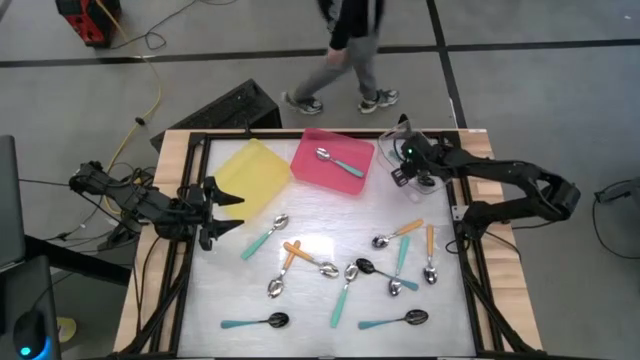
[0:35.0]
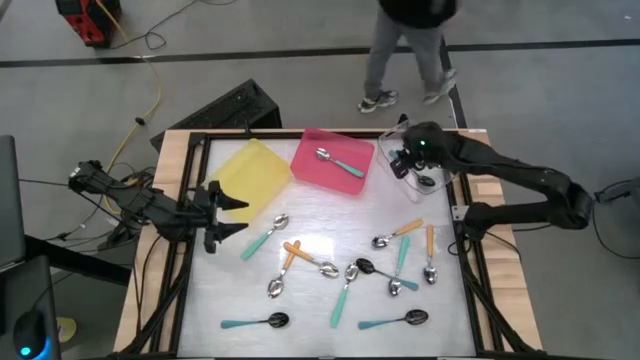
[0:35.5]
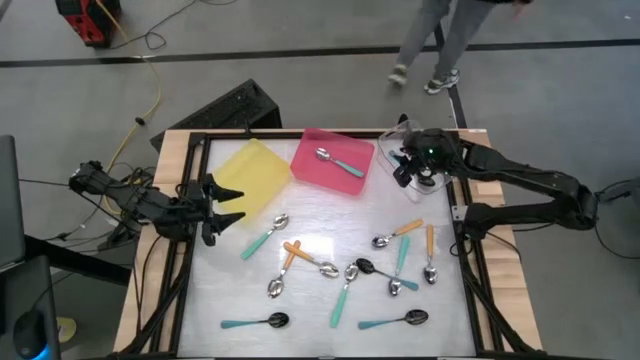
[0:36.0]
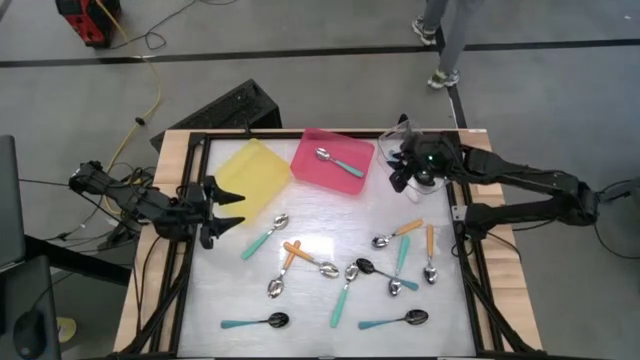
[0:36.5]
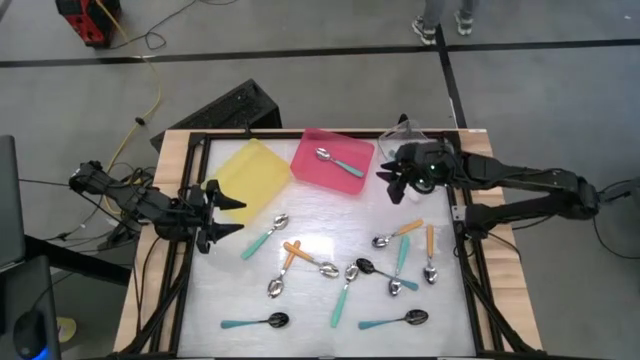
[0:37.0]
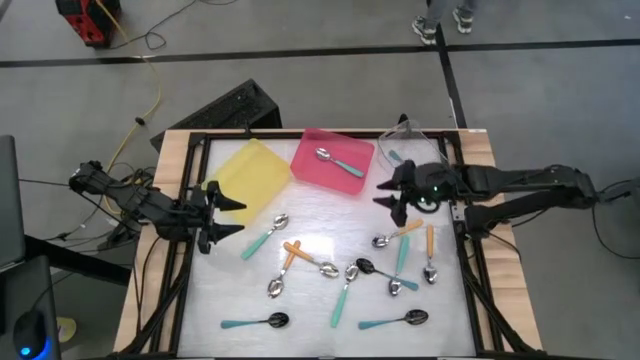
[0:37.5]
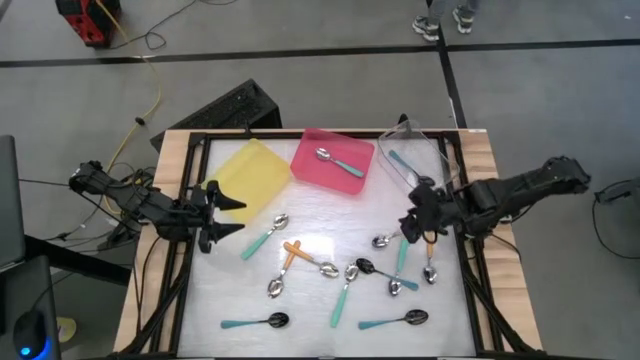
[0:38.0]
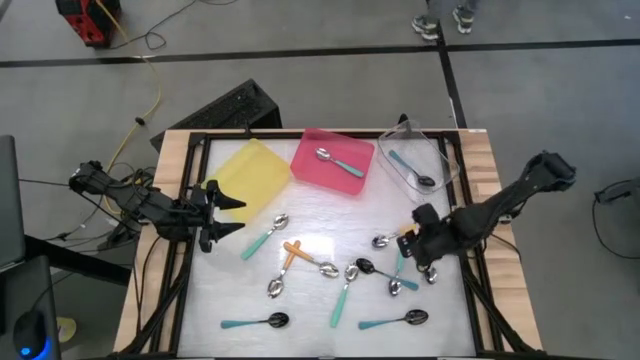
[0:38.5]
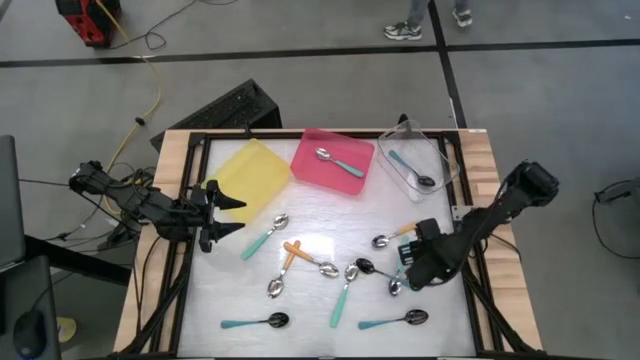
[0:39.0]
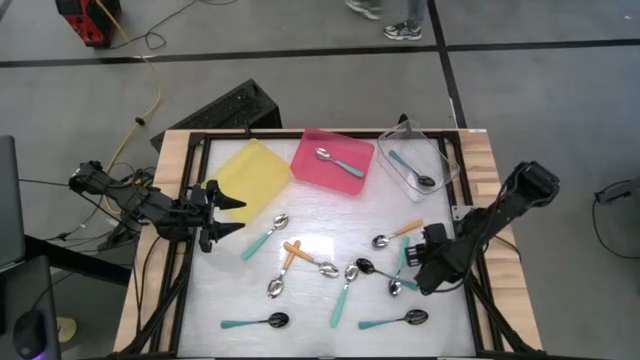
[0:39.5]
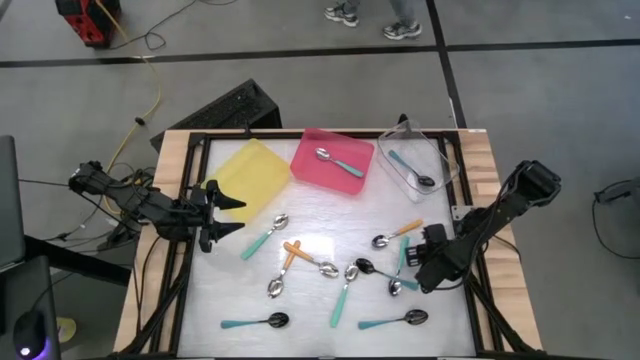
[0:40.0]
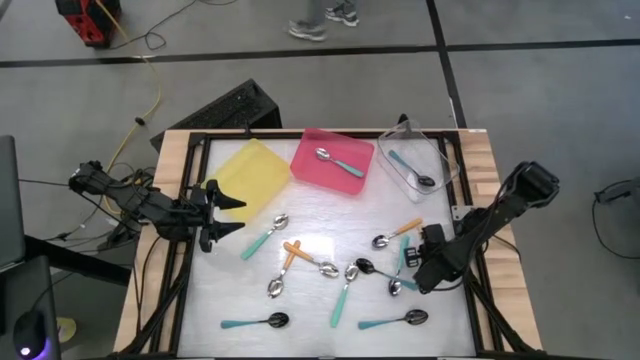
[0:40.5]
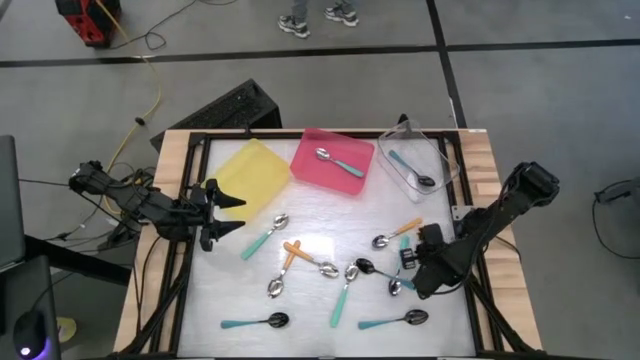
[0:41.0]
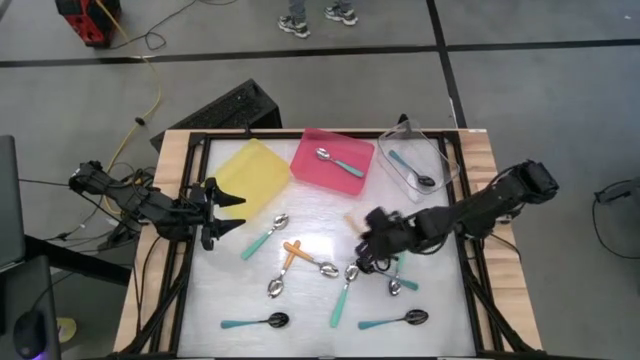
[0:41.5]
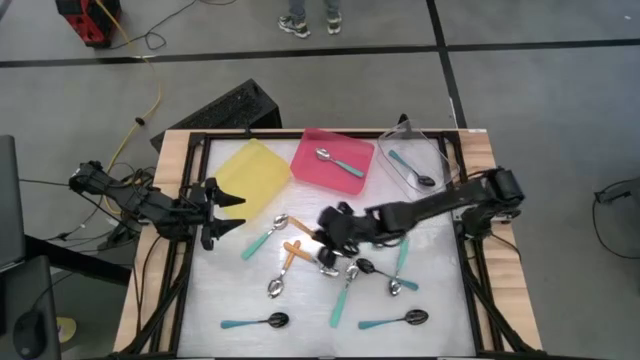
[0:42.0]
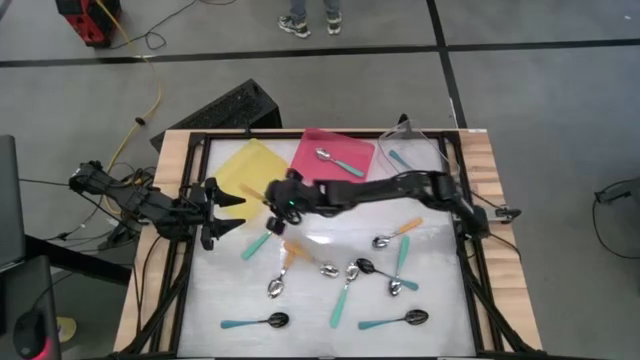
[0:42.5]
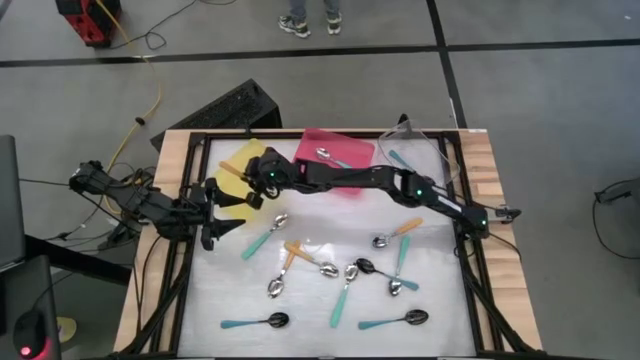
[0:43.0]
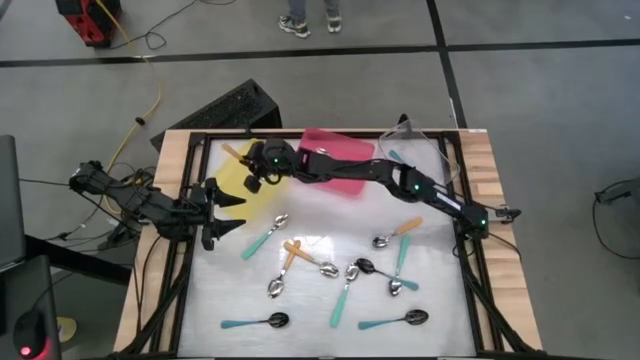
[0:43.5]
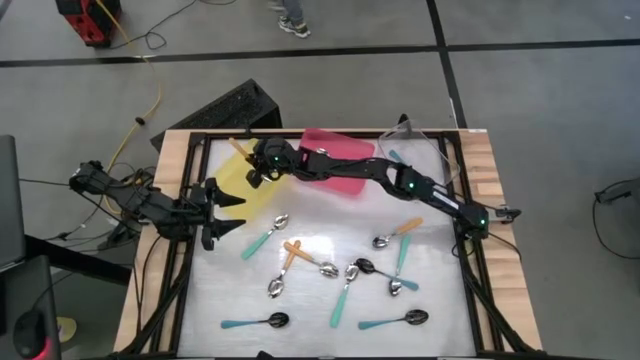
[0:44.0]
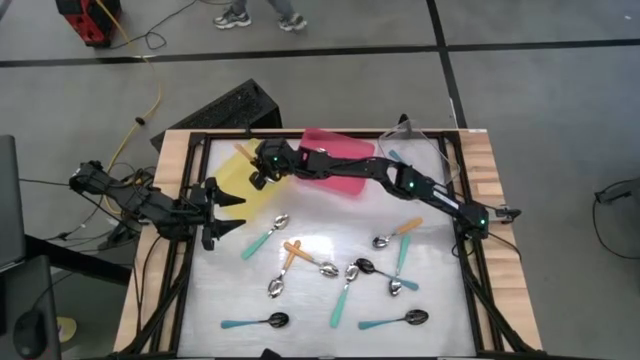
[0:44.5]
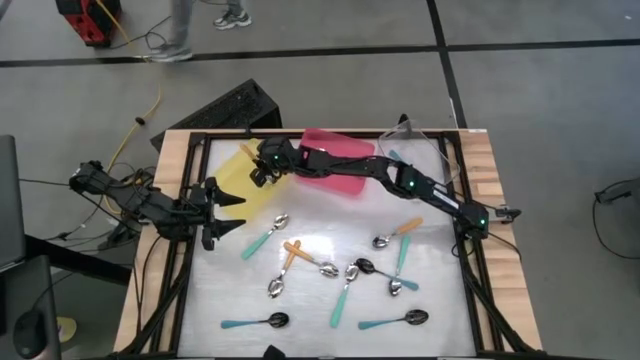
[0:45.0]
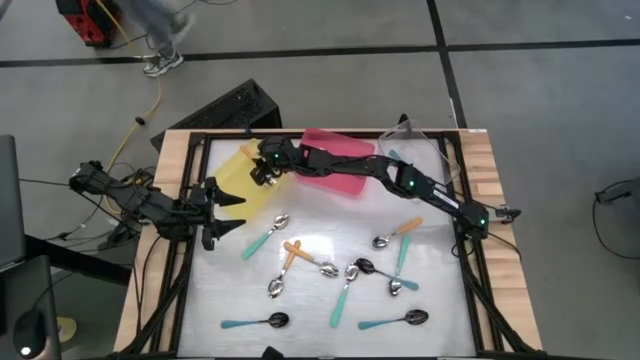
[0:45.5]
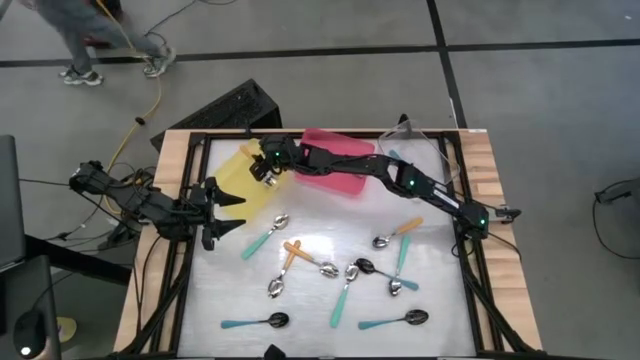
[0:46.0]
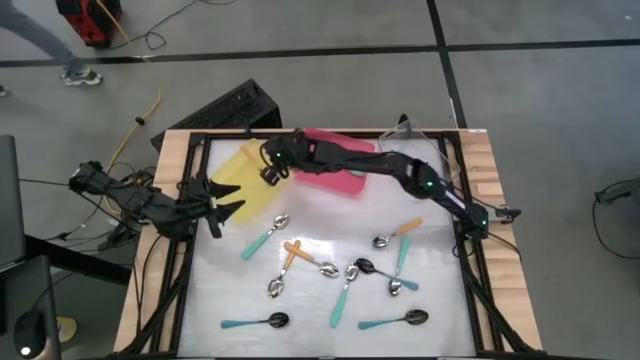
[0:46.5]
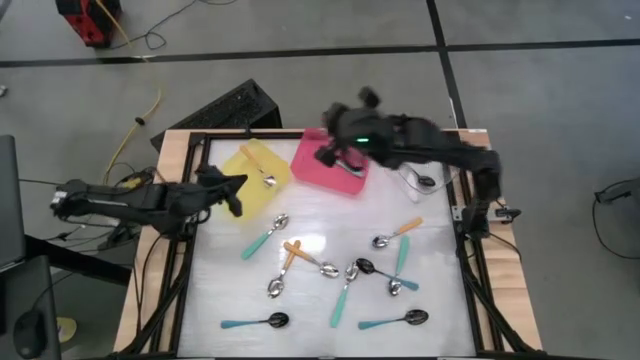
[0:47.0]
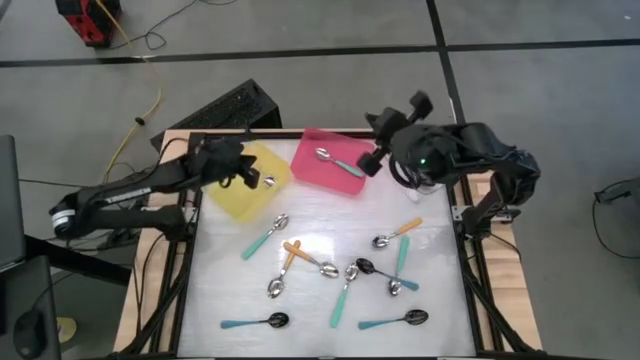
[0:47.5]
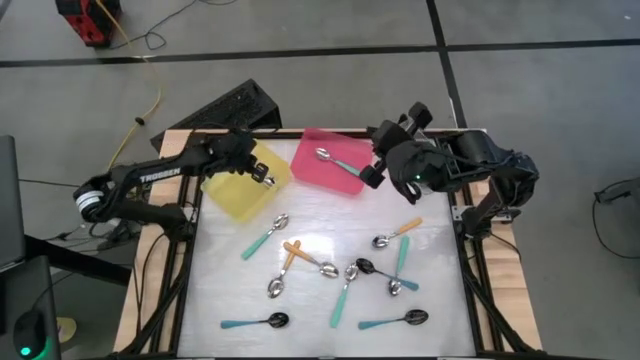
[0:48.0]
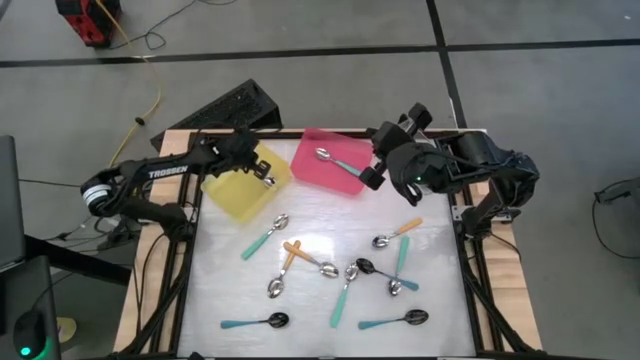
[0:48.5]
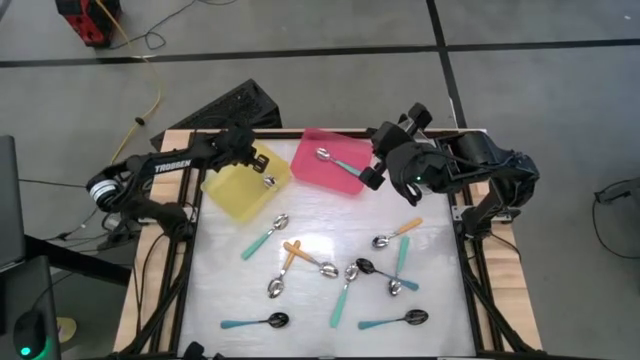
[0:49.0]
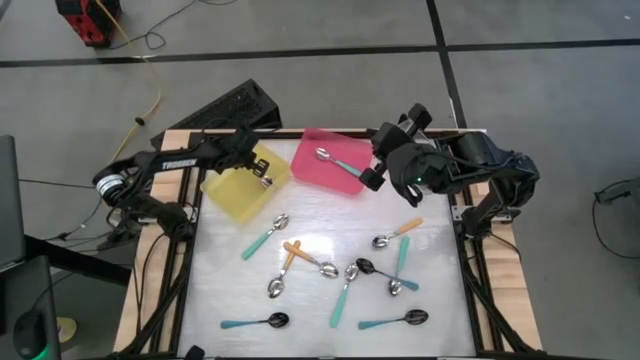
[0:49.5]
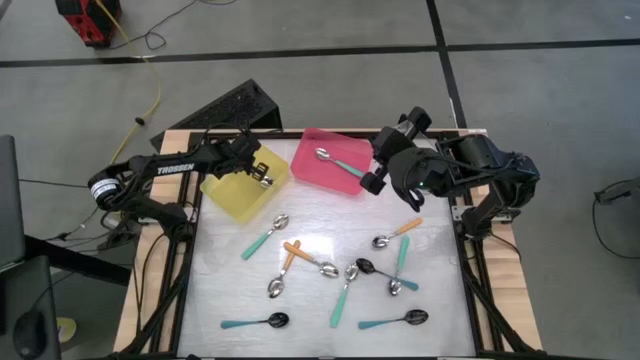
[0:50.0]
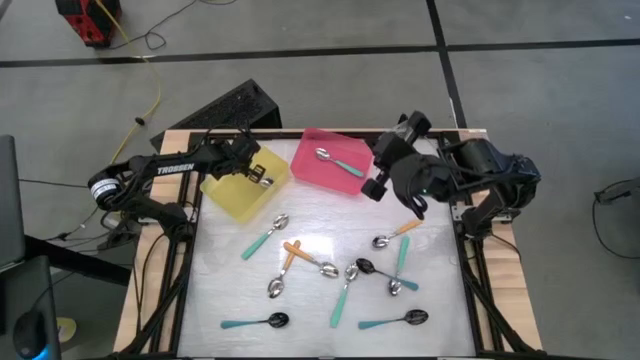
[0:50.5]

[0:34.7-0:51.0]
Task: Sort silverware by color (type)
Put the yellow spoon into the yellow bin

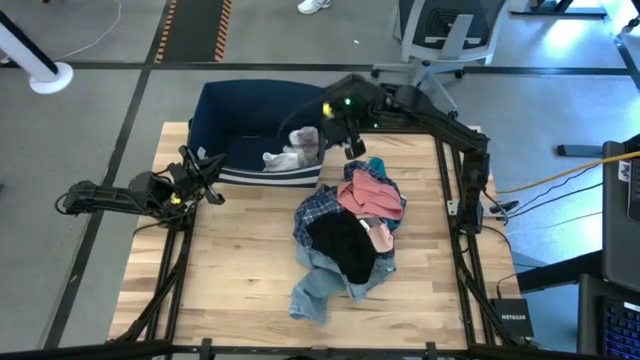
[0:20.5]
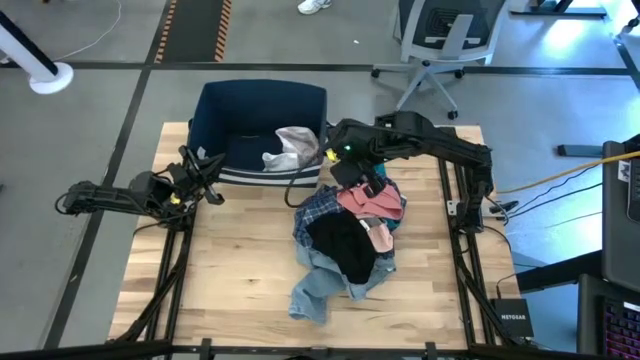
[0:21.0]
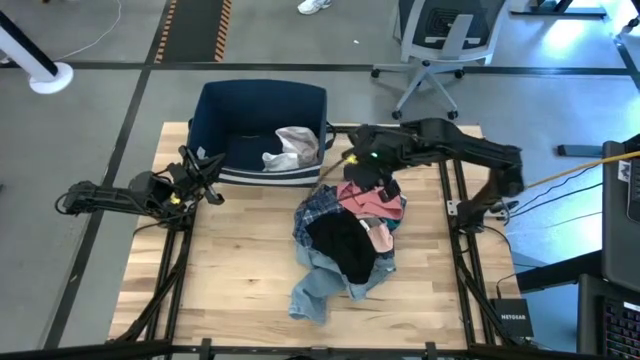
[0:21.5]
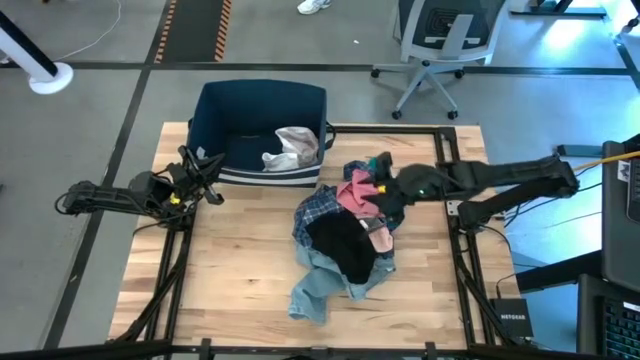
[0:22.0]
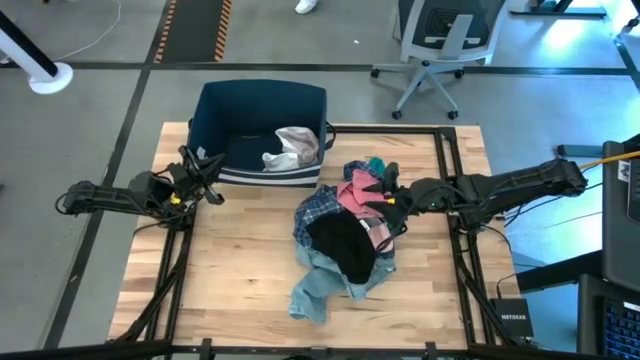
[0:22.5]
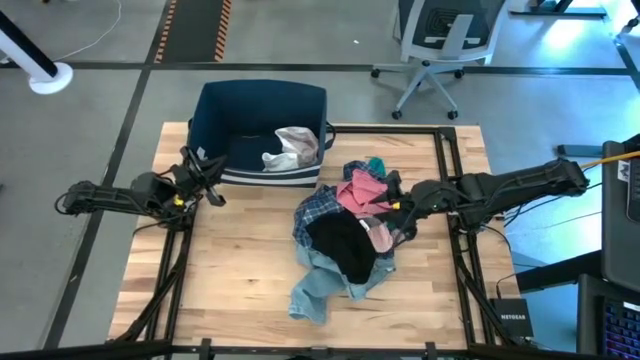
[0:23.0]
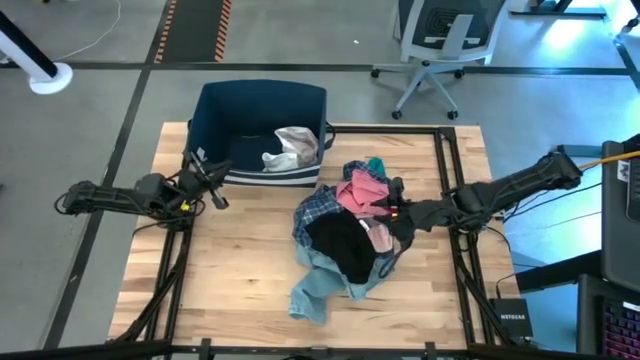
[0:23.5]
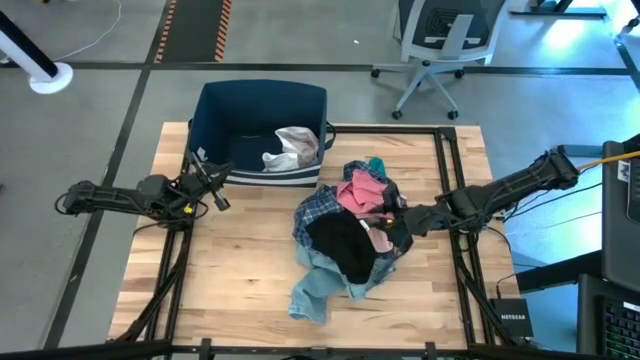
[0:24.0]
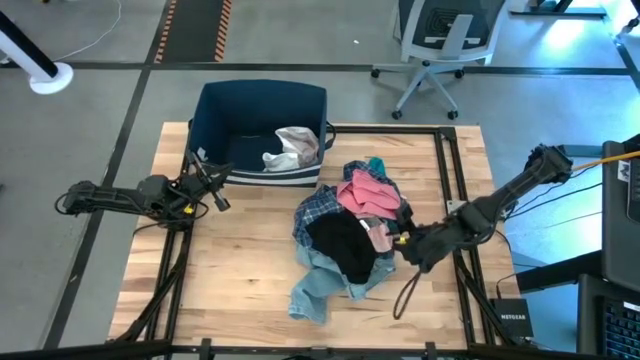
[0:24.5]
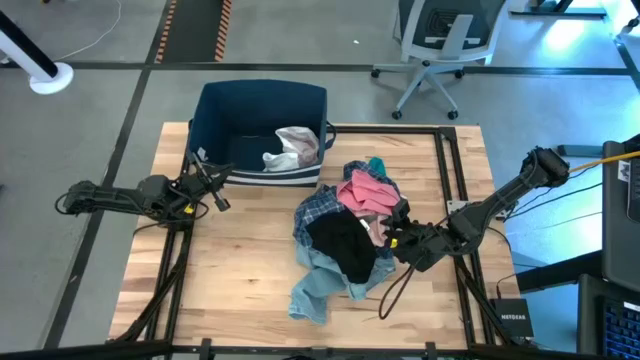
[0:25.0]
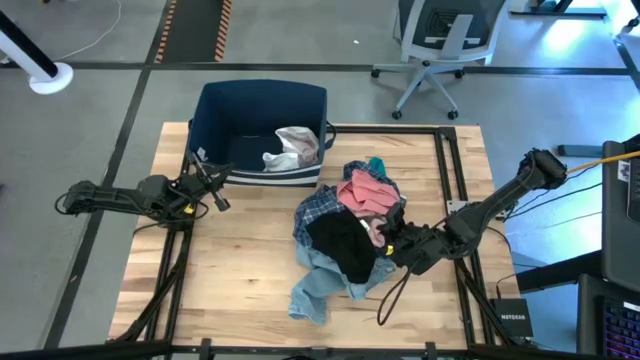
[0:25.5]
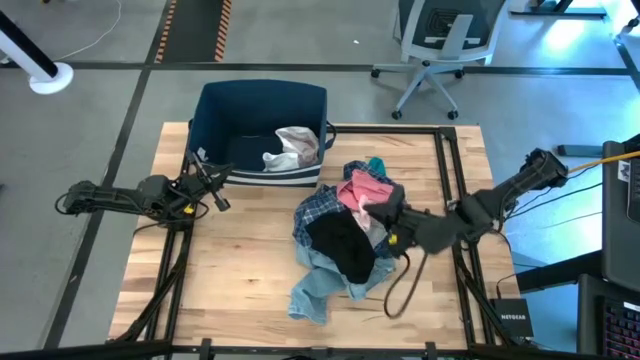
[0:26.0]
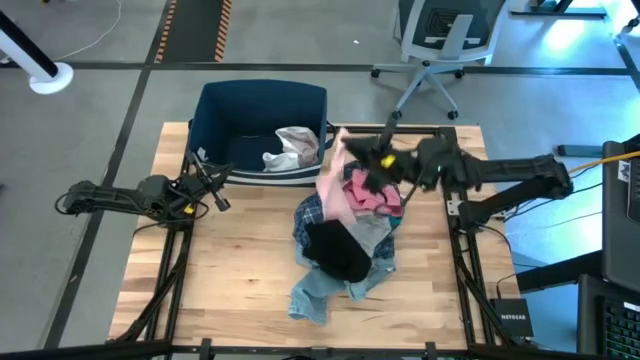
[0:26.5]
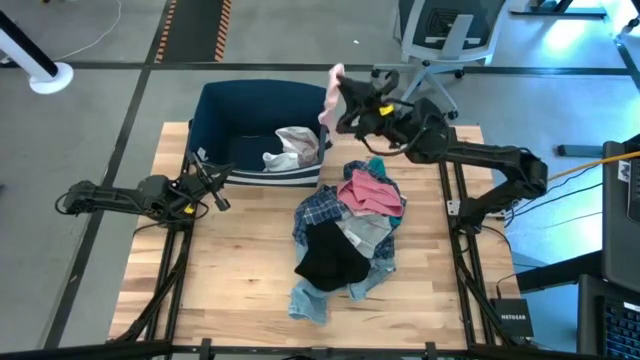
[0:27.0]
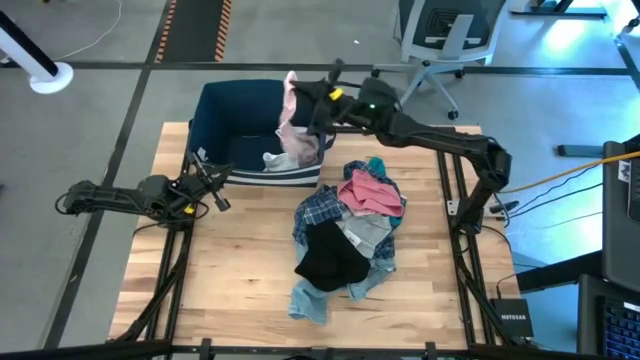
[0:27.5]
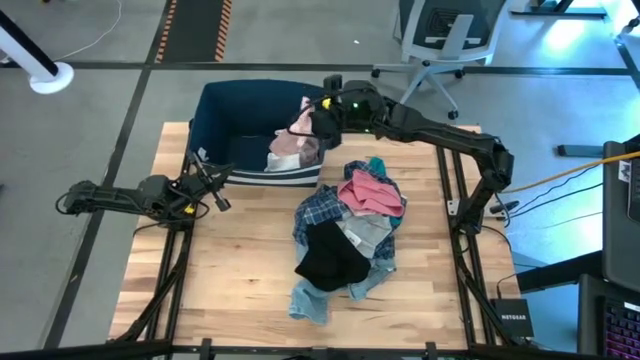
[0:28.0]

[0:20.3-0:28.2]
Task: Sort clothes
Put the pink sock into the blue laundry bin
